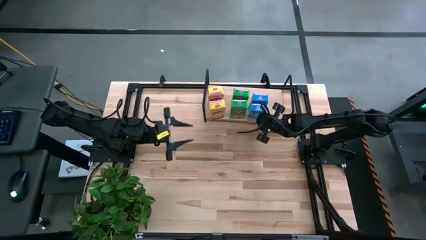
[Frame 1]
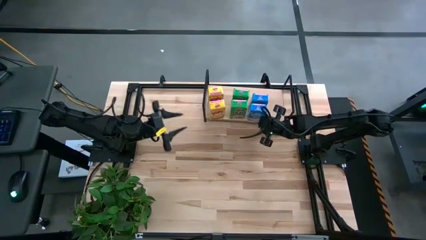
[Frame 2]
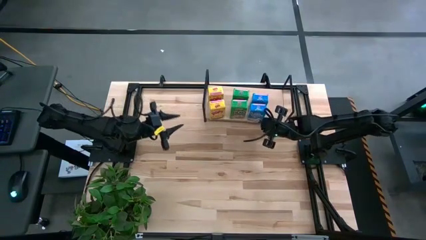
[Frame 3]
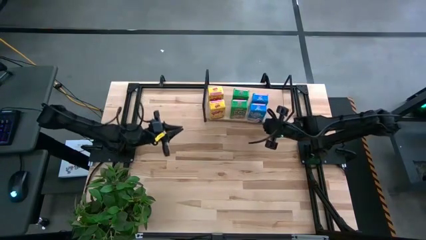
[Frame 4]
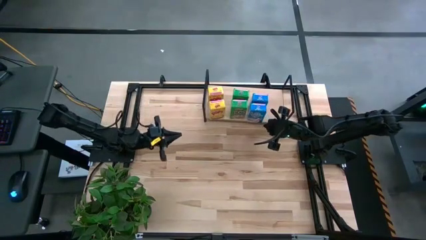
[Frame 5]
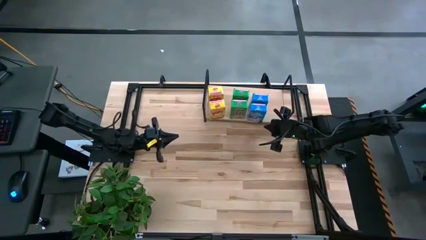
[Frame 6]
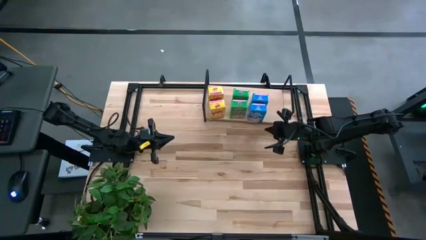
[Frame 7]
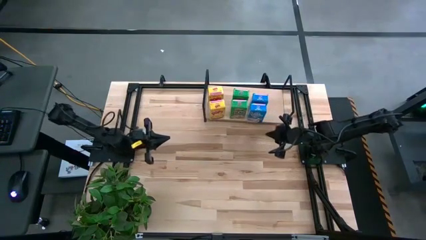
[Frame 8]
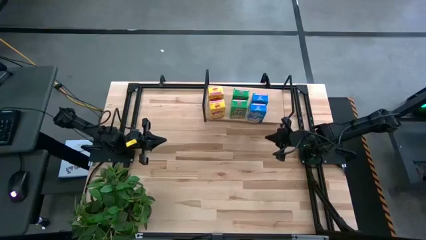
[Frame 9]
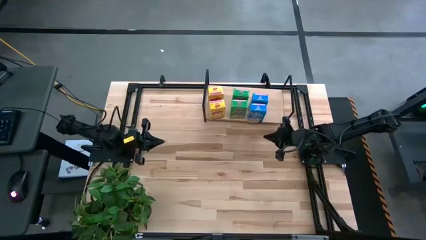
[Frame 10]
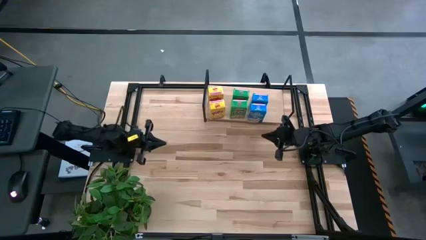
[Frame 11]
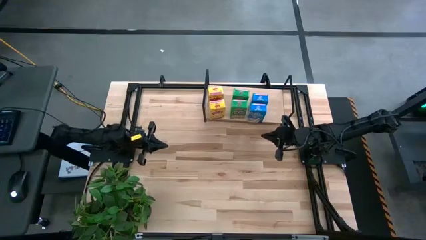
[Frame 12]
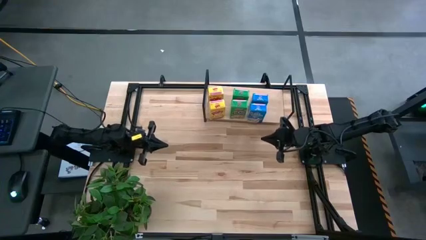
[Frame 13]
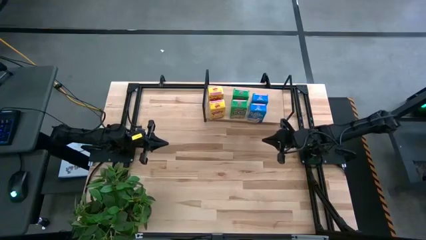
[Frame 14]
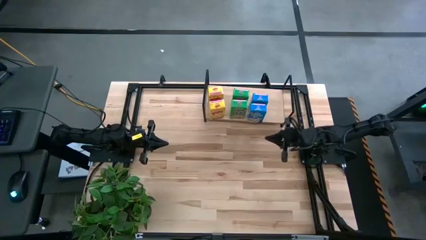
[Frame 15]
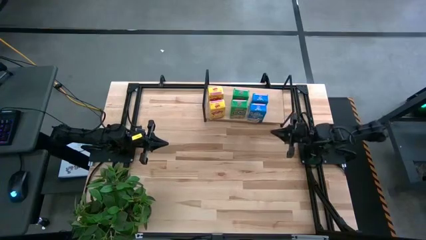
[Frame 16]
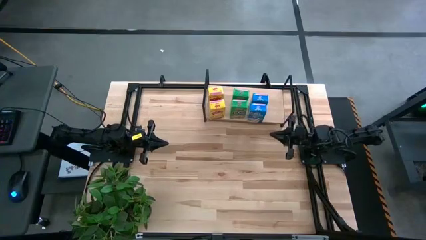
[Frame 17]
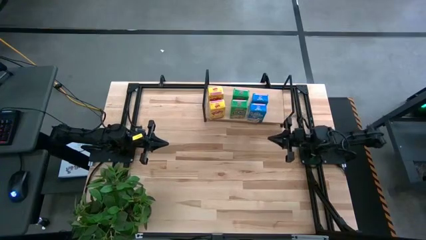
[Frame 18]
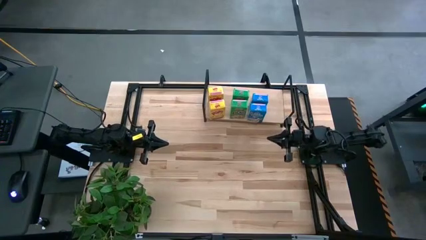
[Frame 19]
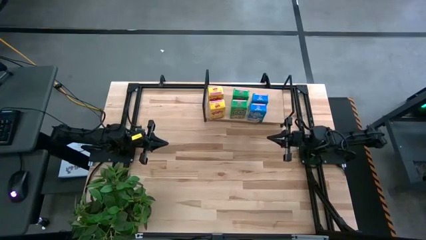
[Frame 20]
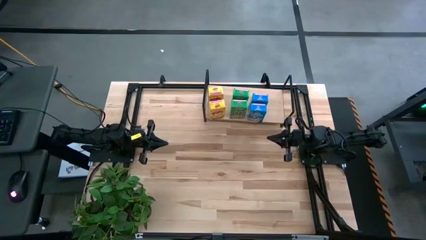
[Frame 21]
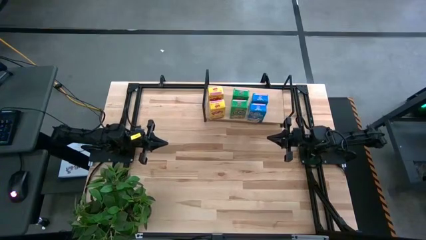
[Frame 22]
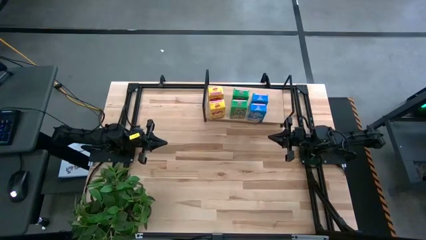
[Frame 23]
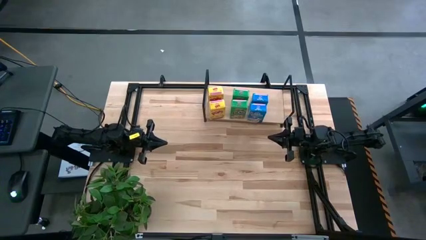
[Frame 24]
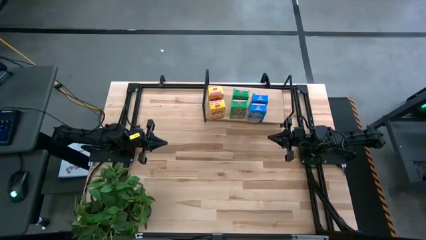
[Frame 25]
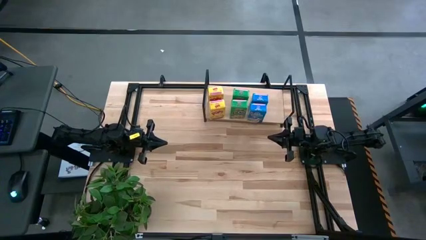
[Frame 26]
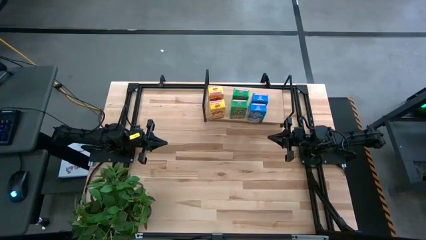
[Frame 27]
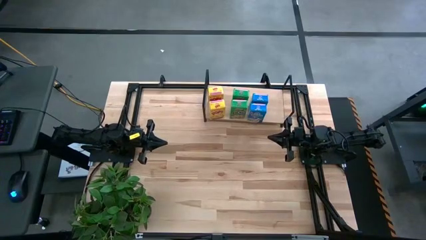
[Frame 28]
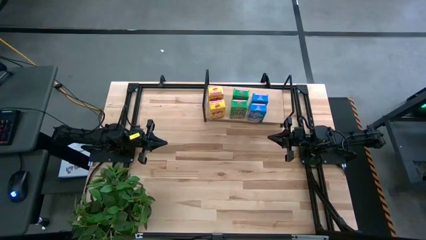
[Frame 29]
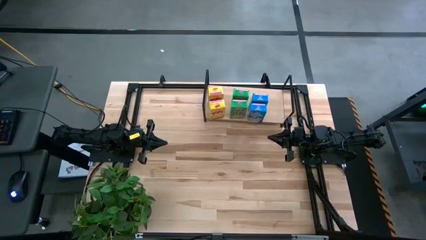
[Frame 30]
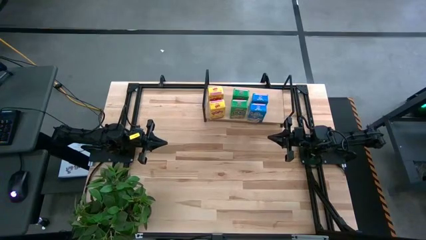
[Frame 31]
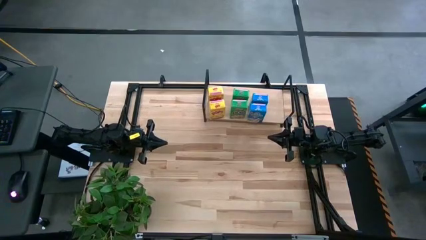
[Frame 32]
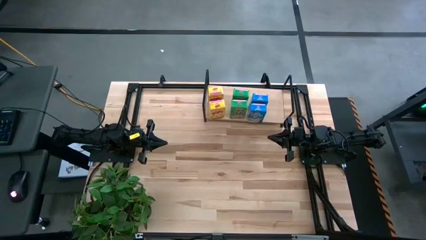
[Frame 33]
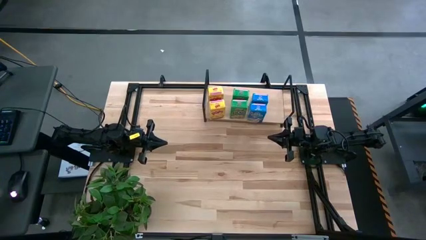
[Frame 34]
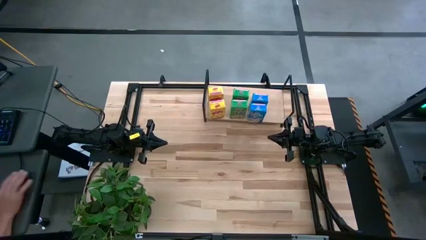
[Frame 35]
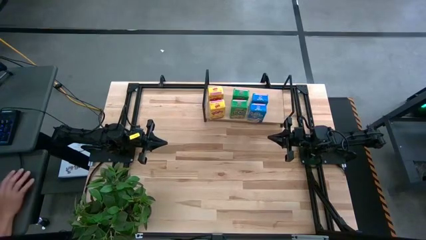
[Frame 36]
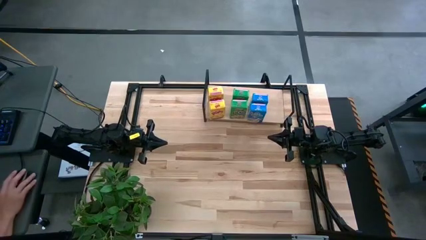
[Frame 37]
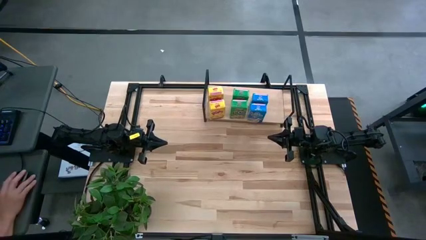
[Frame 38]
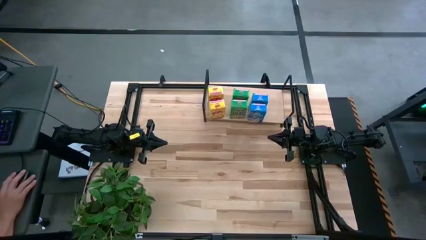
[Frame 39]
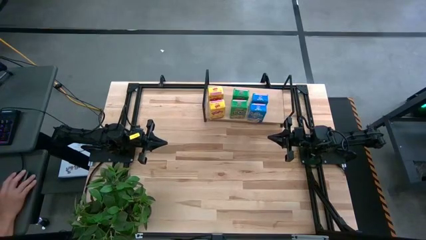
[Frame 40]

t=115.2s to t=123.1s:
Task: Stack cereal on shelf
Return to Home Position

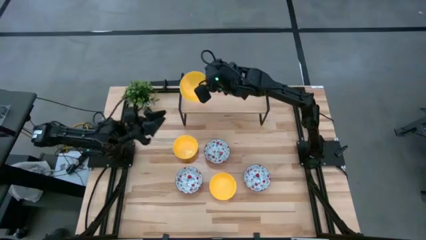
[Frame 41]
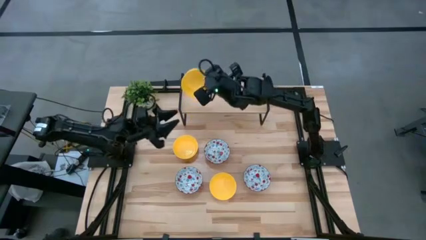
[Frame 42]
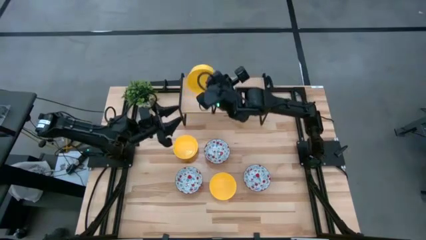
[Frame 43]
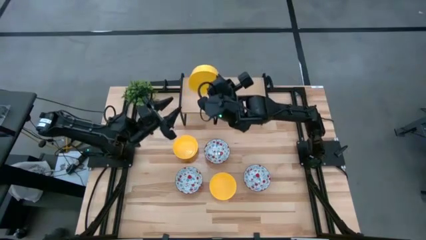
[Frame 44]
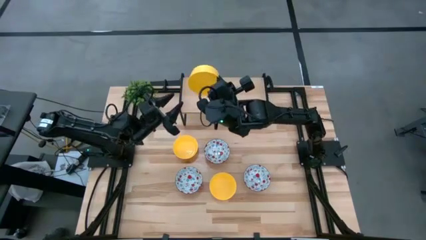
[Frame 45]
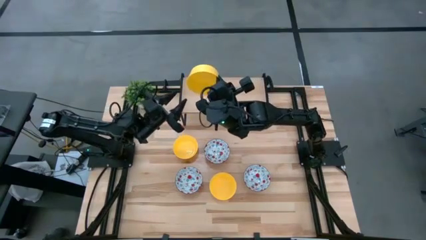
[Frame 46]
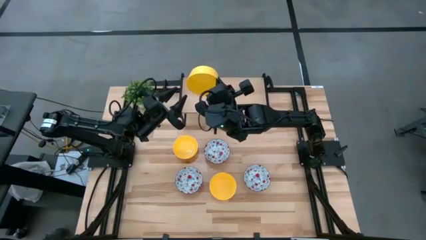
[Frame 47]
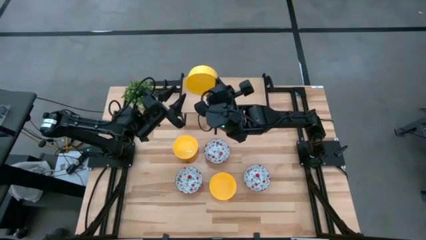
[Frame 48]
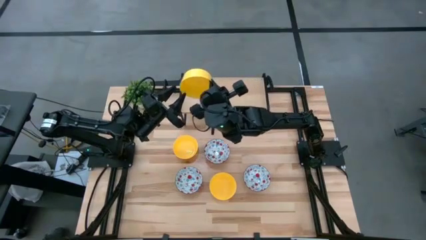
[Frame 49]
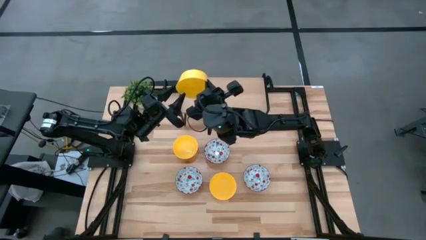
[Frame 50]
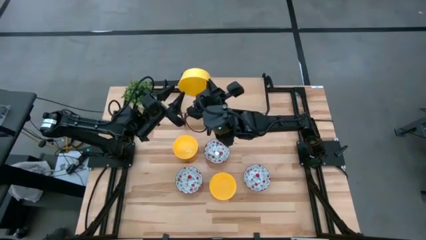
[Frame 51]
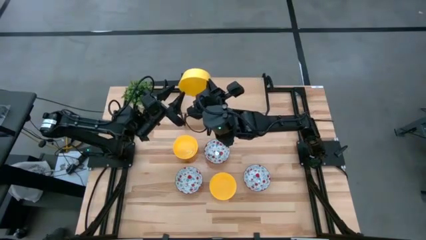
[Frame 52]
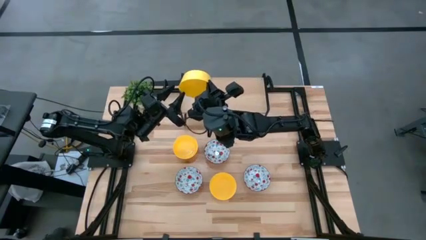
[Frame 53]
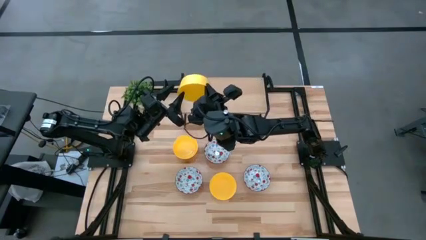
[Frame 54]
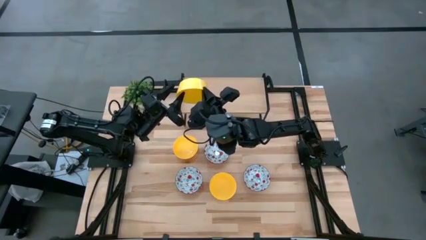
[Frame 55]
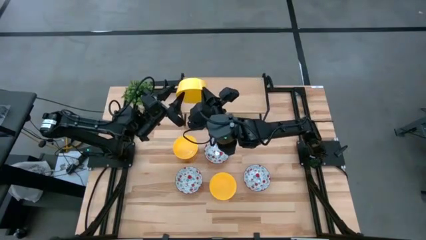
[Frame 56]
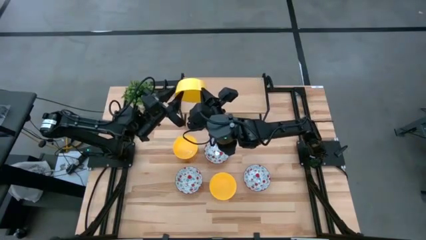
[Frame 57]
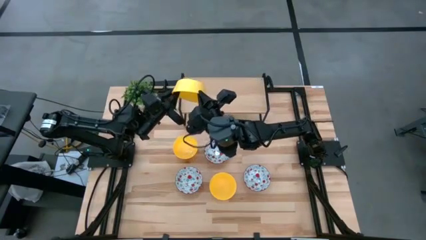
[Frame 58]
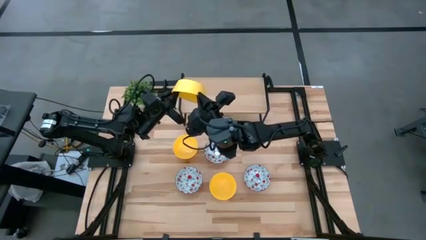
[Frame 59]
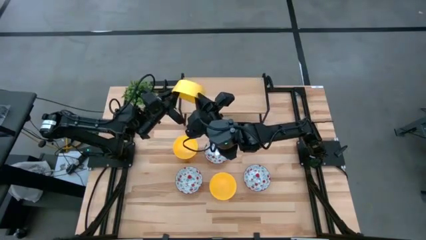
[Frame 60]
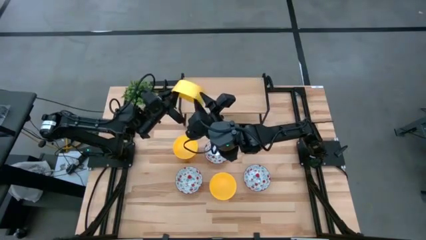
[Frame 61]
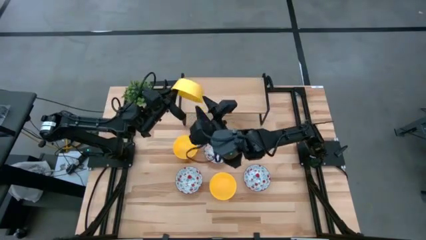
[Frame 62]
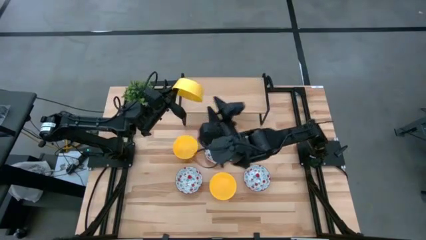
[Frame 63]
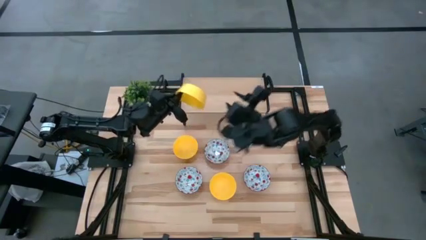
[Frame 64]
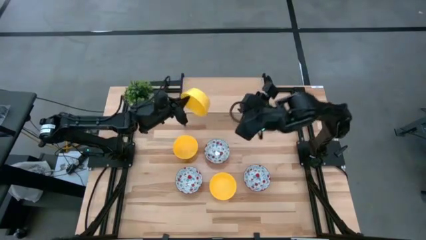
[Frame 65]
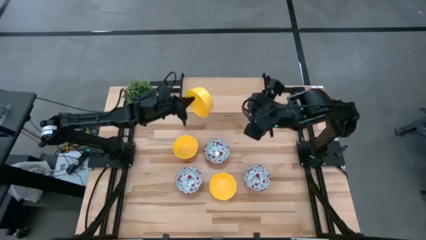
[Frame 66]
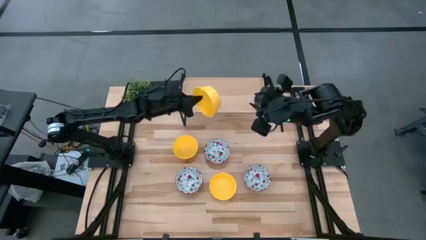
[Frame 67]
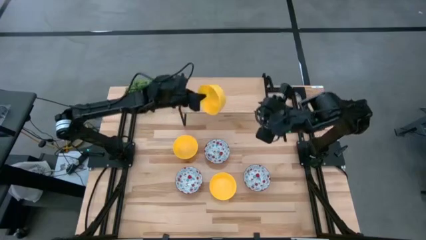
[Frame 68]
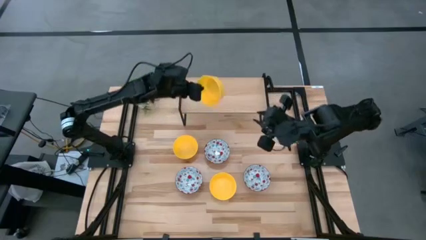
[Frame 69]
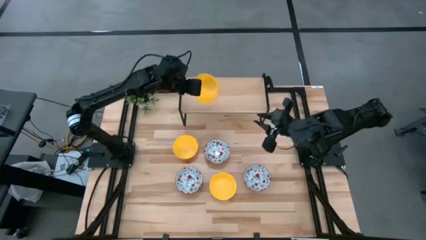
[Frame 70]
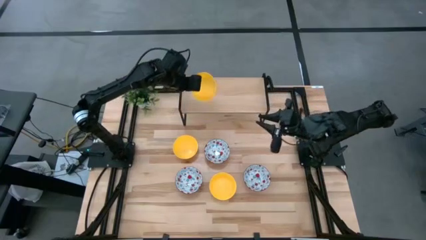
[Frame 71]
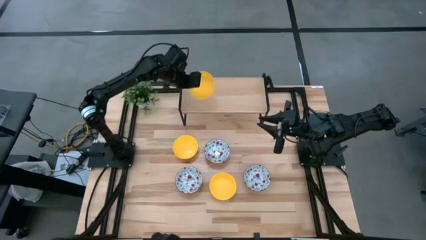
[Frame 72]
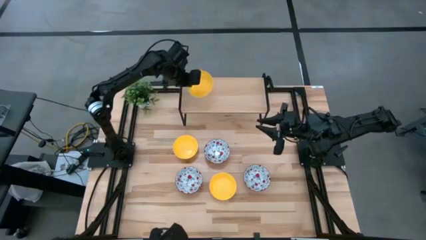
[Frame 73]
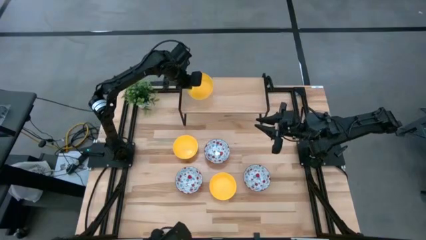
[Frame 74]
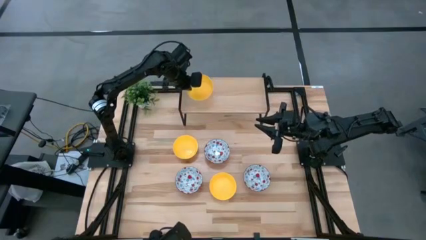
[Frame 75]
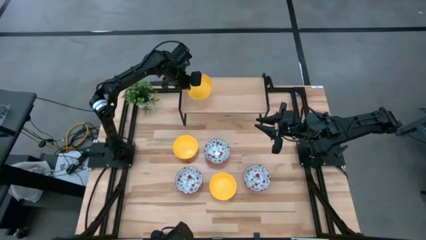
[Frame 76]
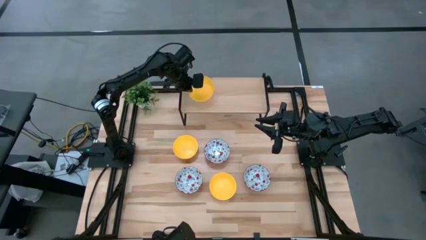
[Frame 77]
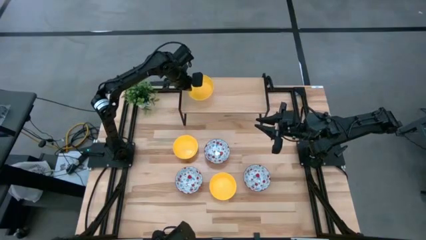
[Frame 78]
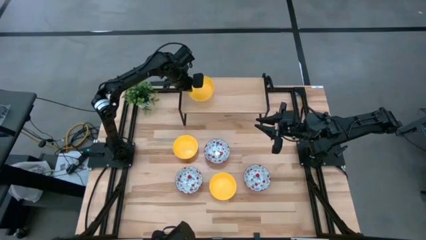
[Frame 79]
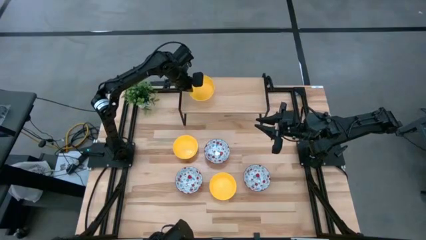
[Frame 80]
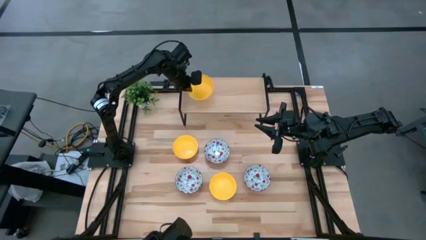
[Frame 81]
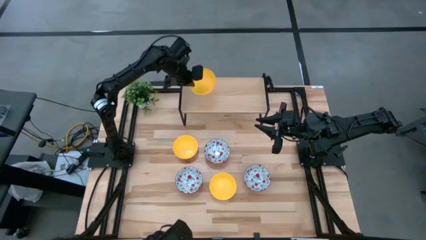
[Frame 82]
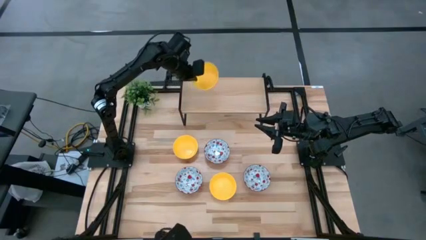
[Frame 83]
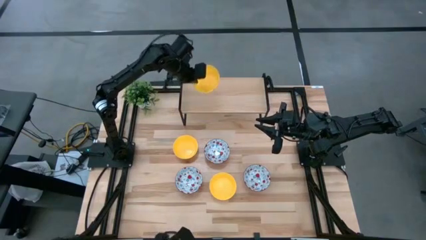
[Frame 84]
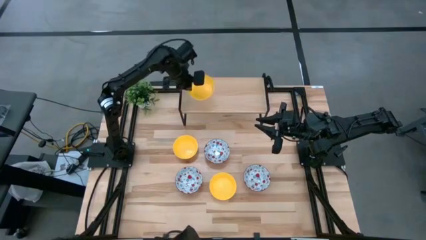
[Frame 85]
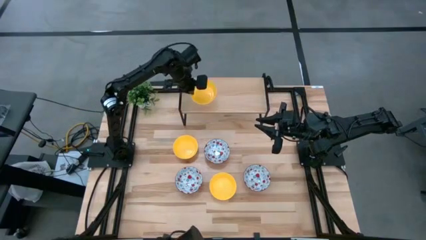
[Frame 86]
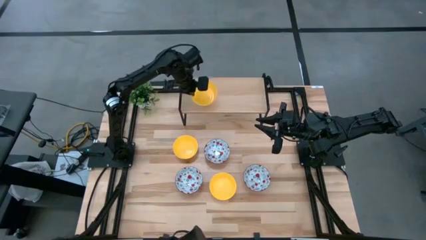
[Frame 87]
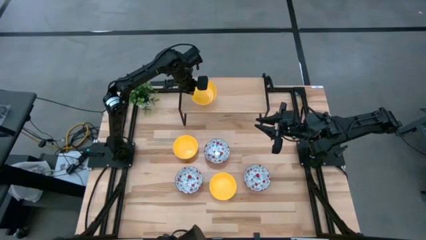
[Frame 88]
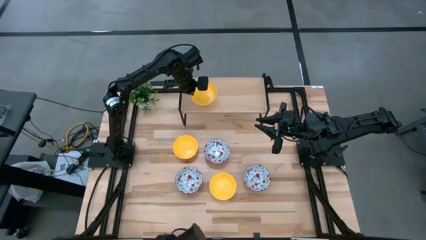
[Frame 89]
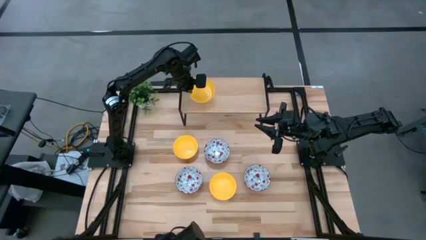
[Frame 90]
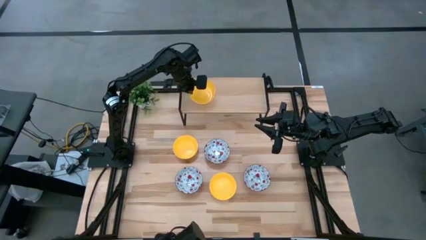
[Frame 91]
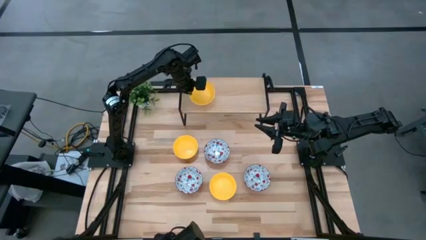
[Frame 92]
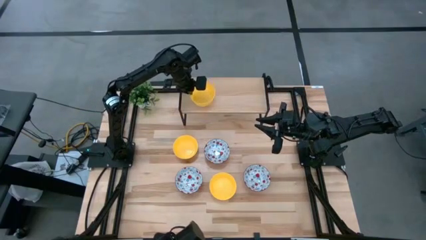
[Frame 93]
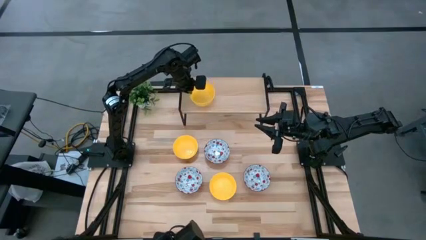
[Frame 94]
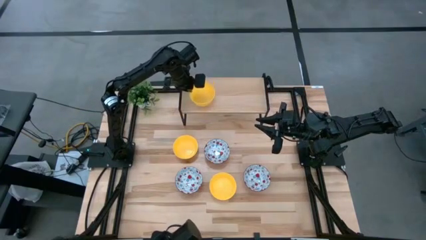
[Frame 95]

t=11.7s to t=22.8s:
Task: Pick & Place Mini bowls
Put the top right yellow bowl on the shelf
